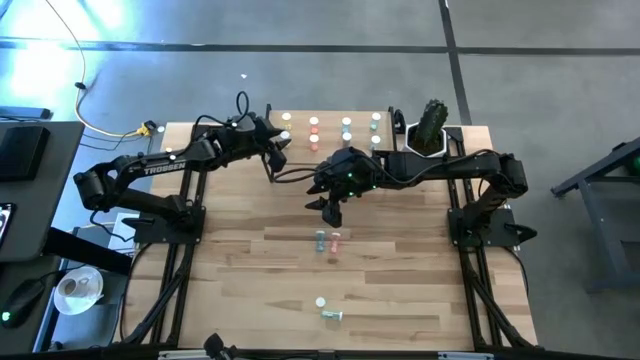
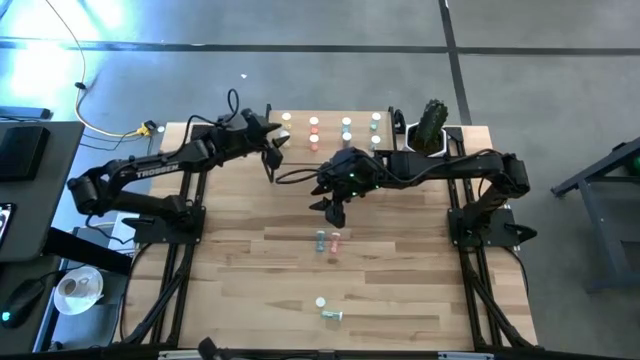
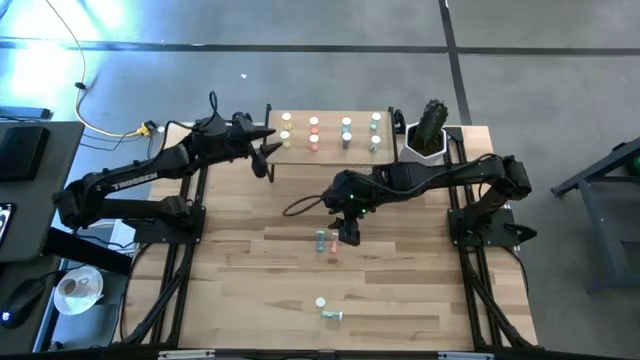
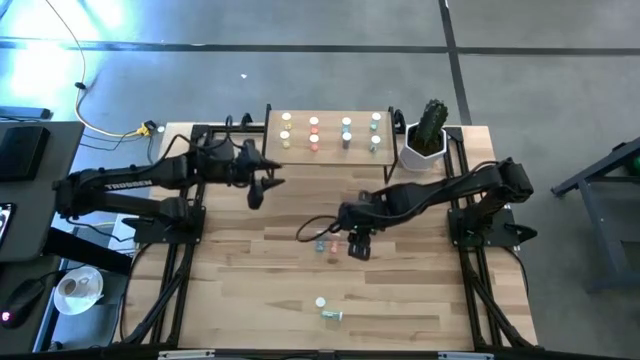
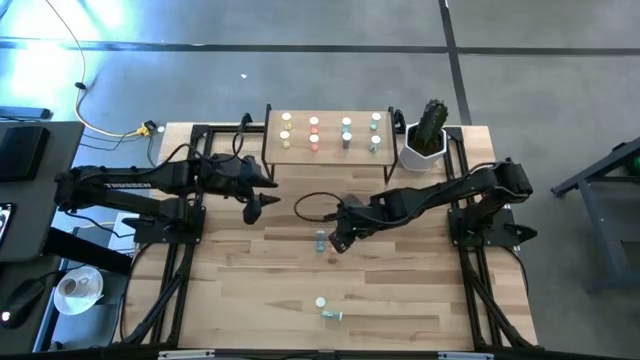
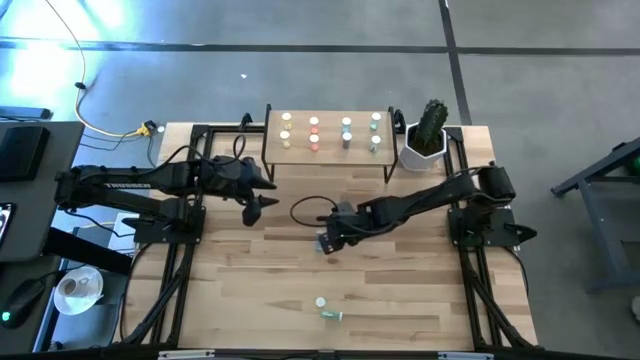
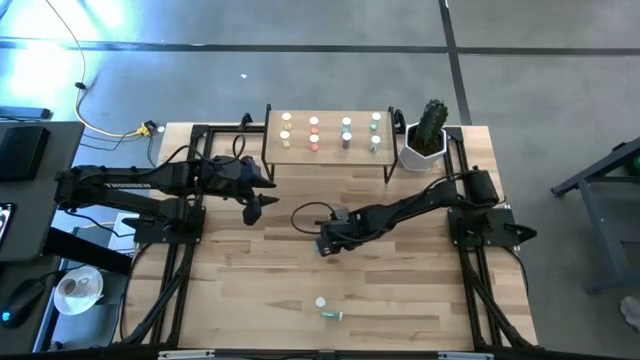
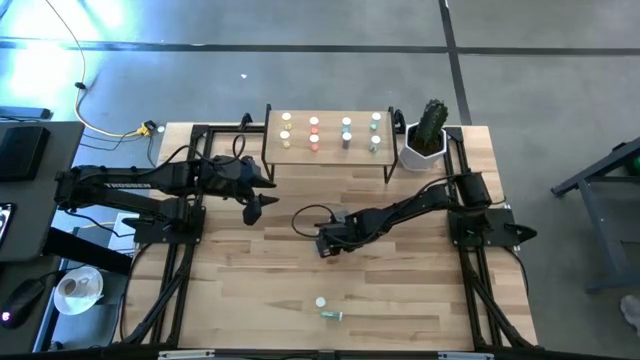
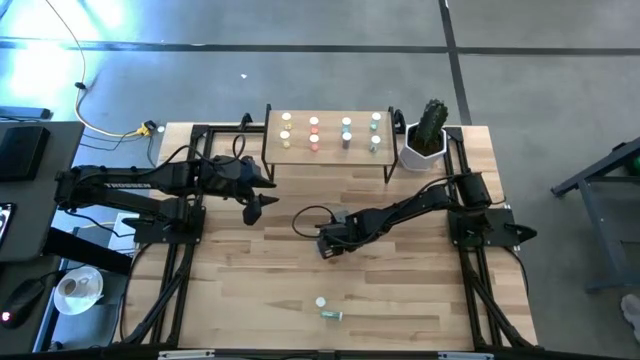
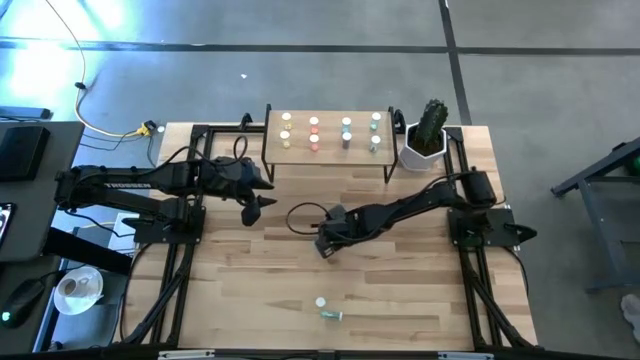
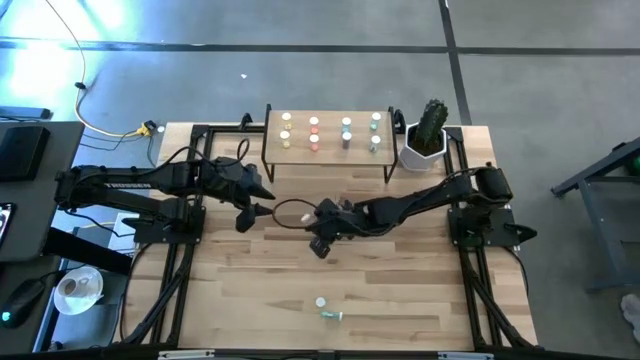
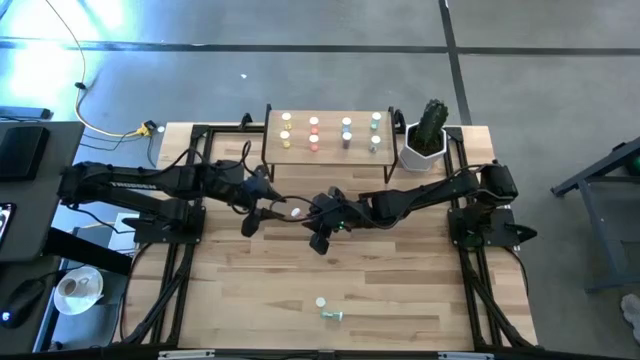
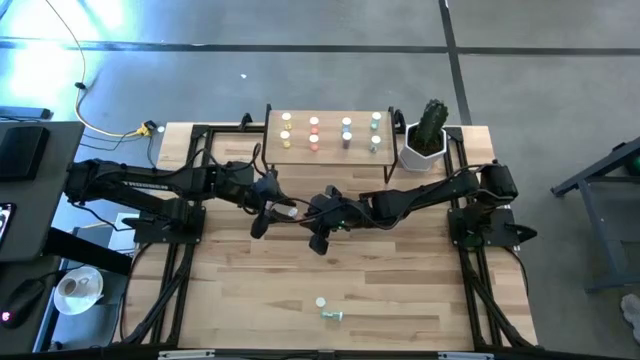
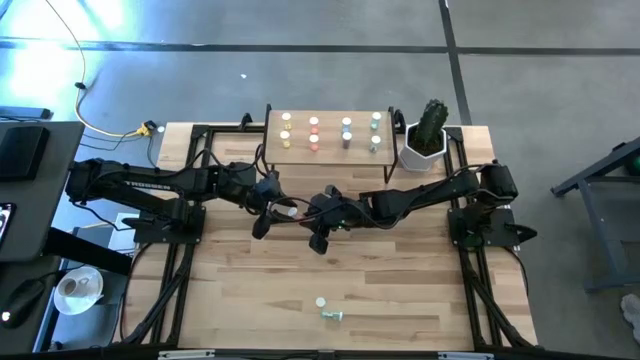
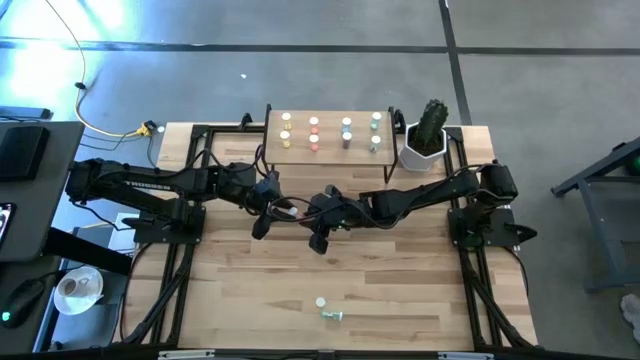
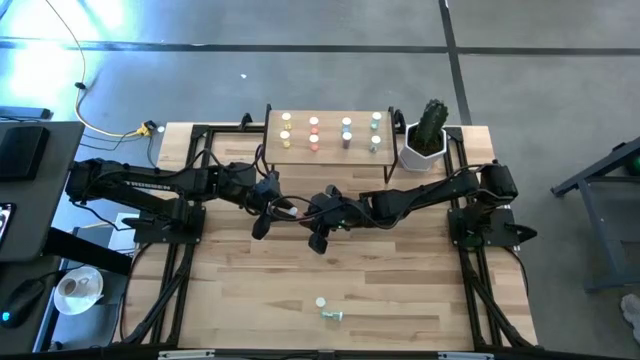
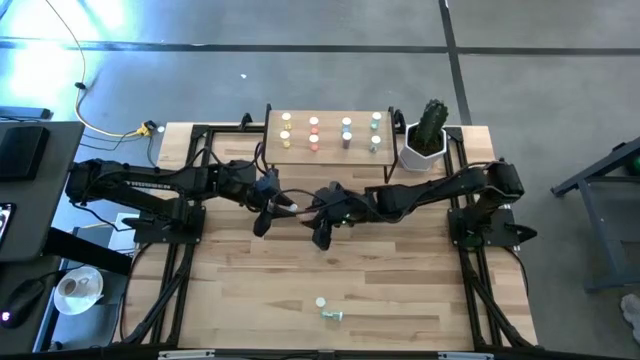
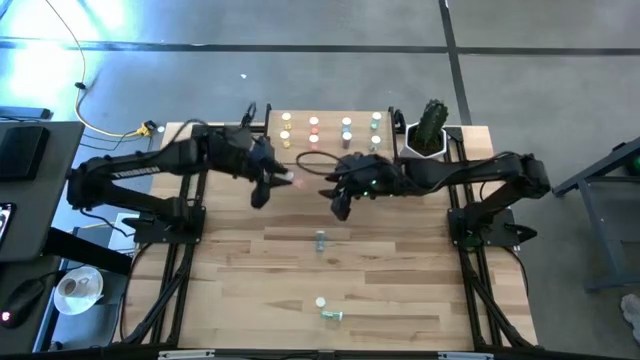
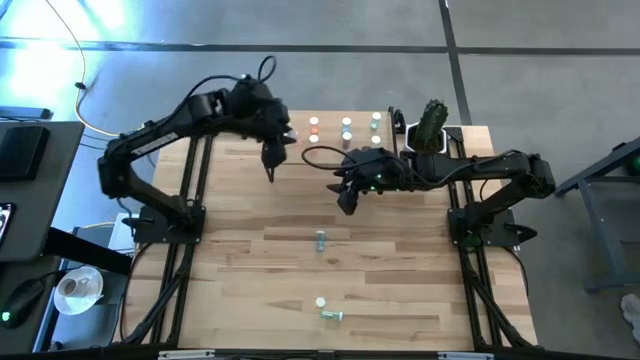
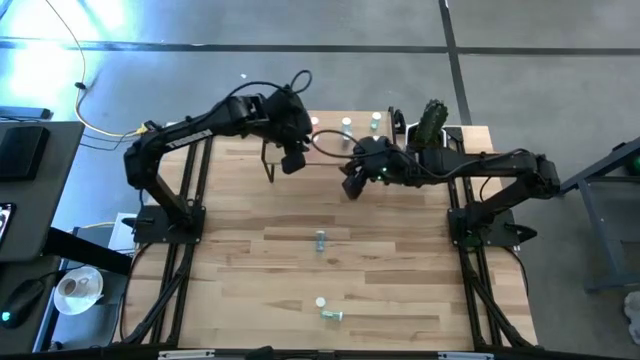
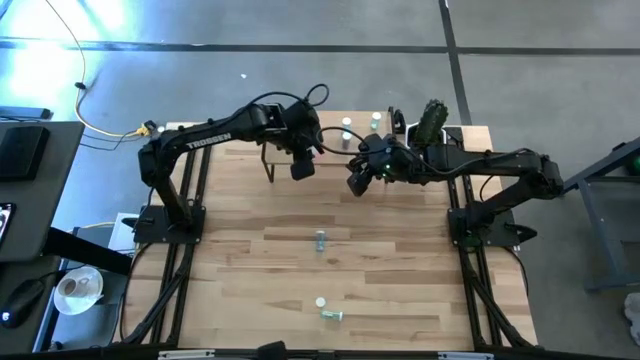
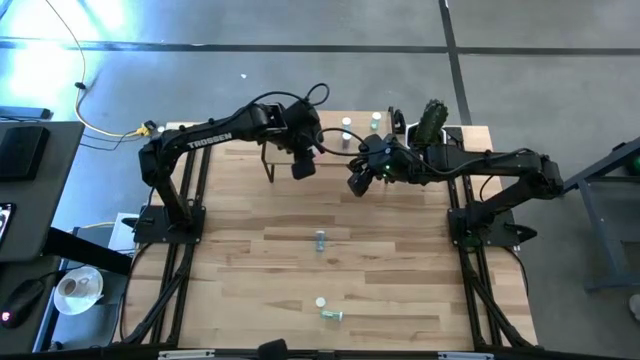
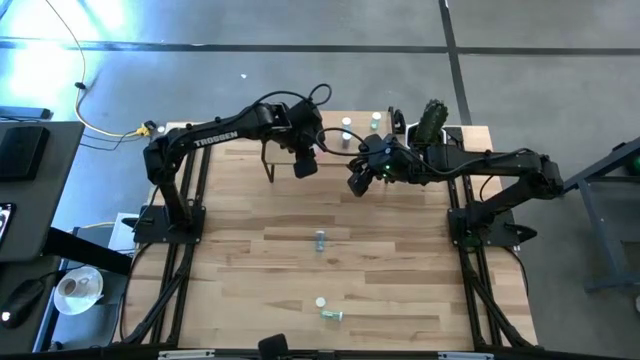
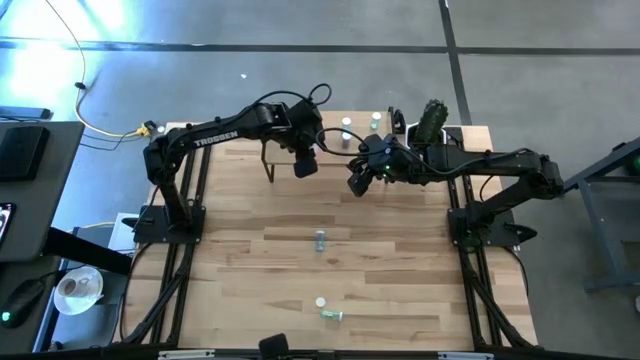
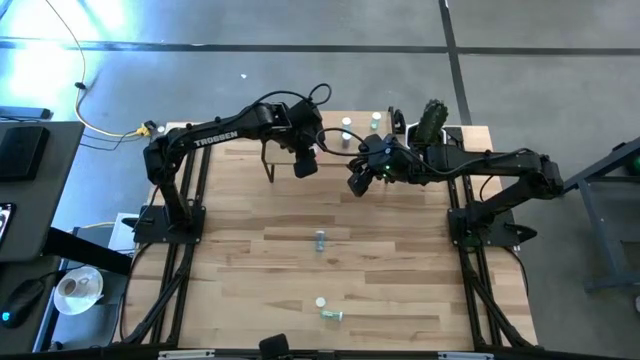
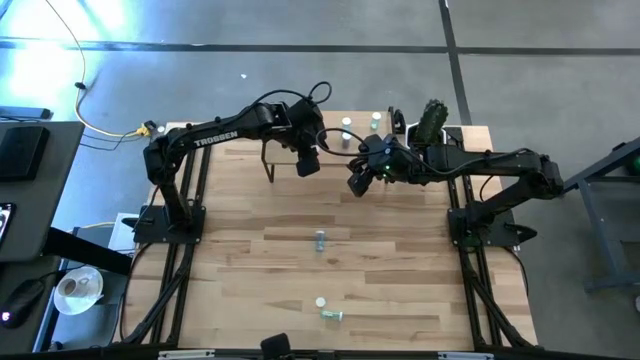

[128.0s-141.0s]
Task: Pick and place medicine bottles onto shelf by color
Put the pink pill bottle on the shelf aligned with the other pink pill bottles

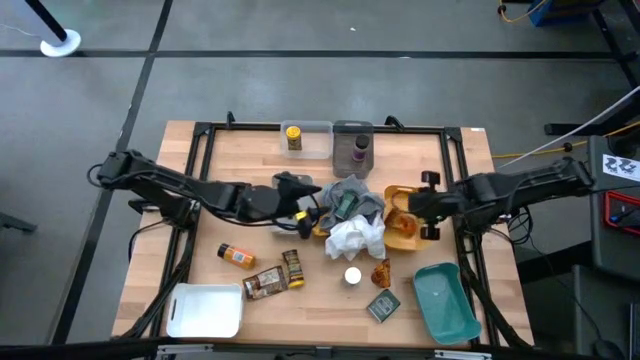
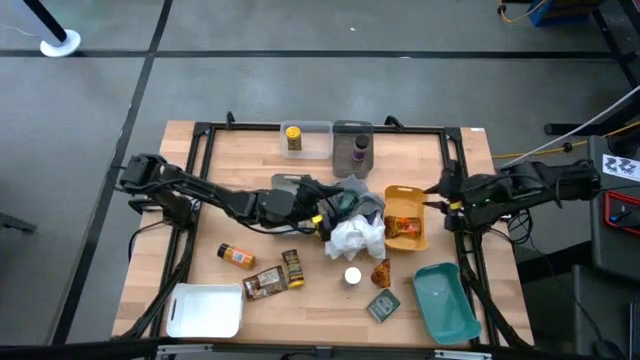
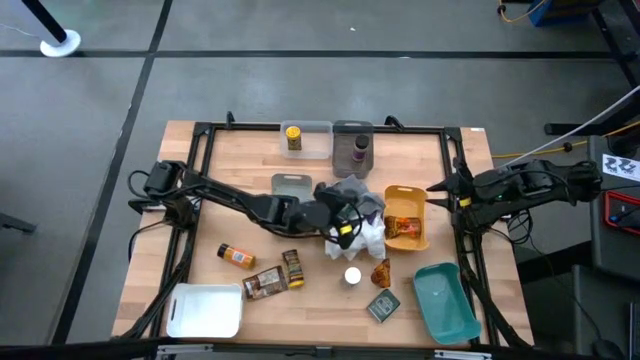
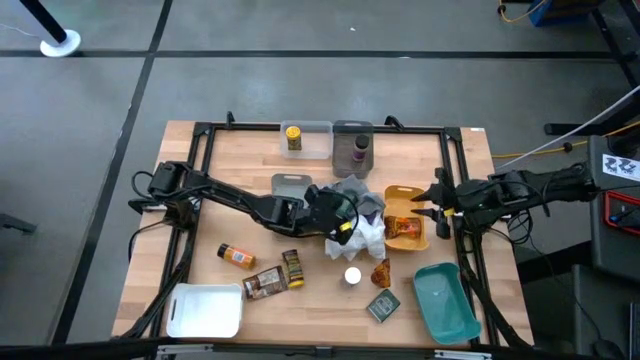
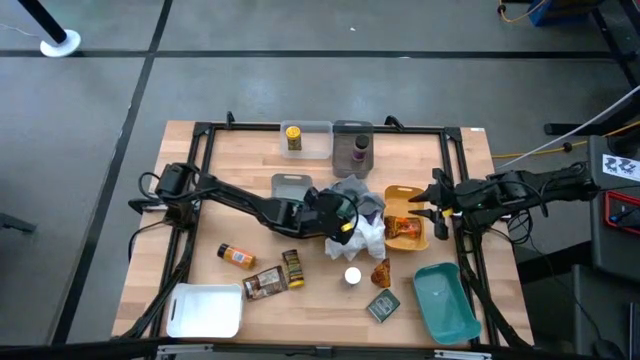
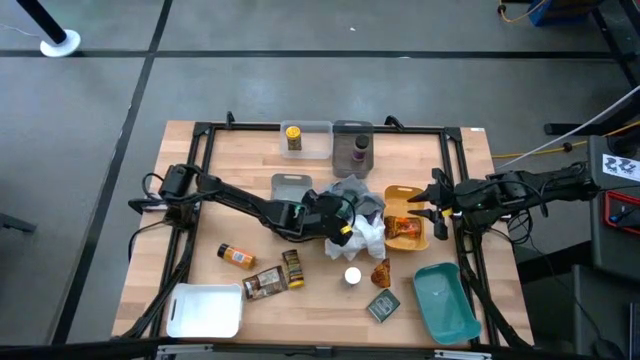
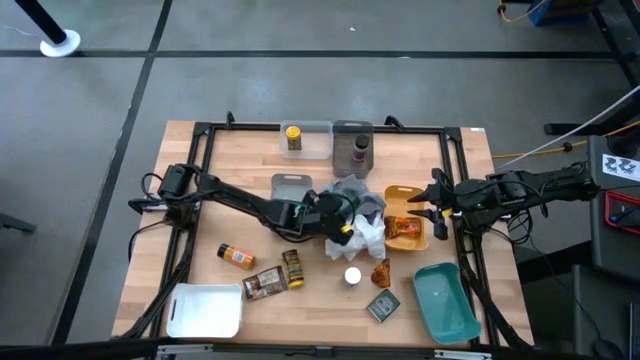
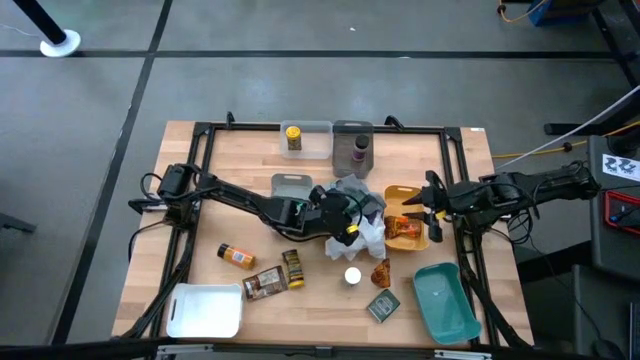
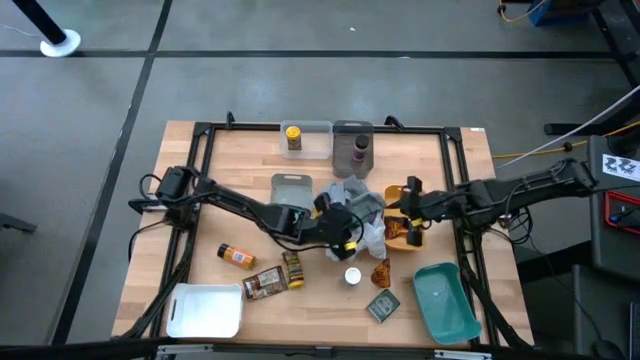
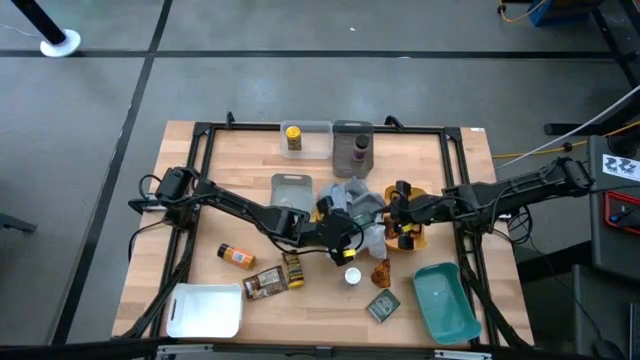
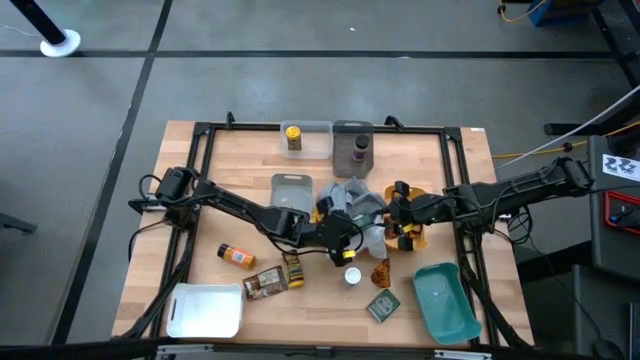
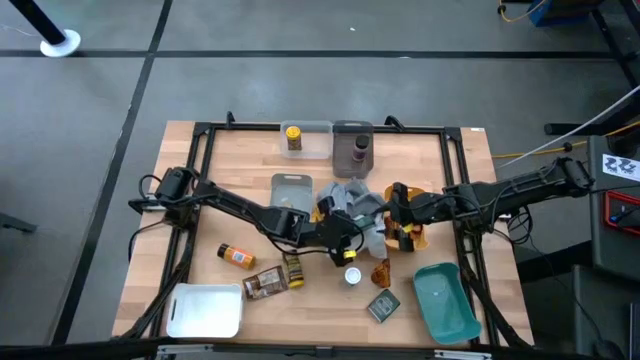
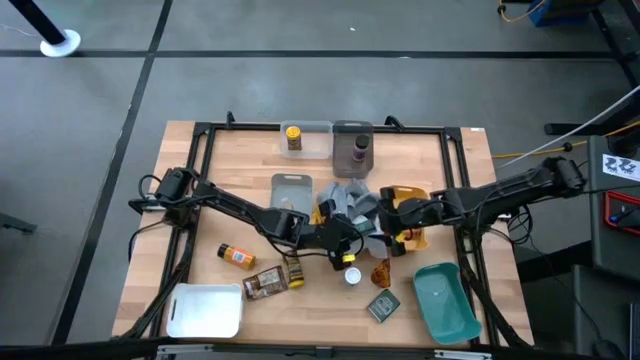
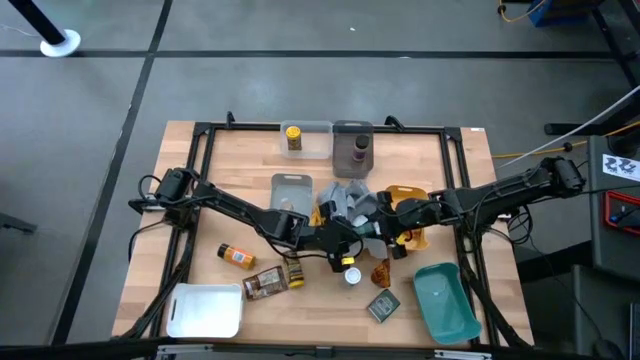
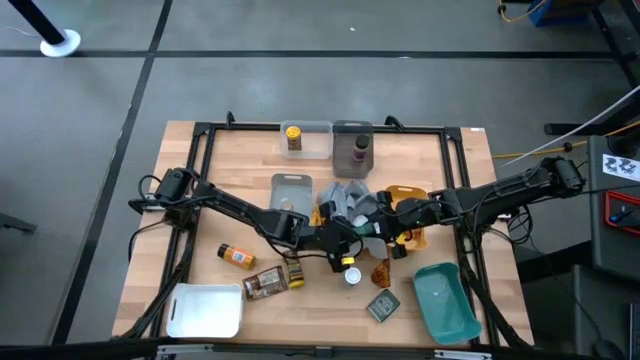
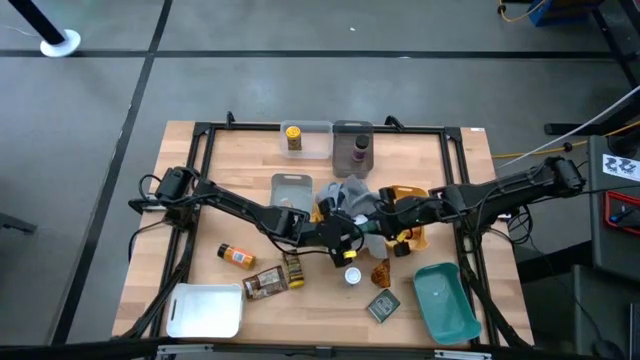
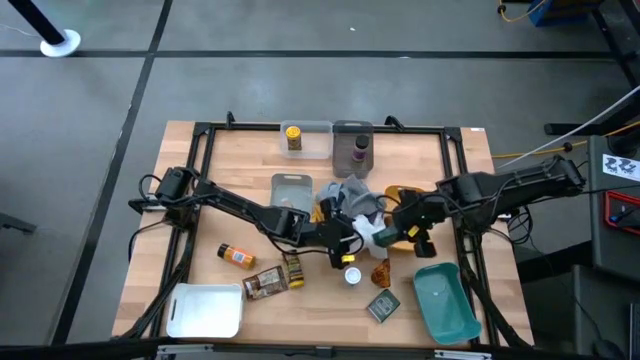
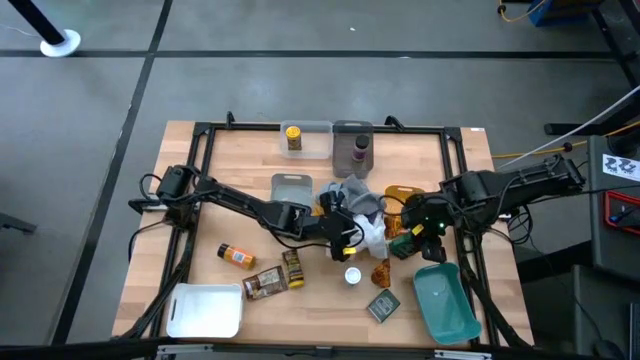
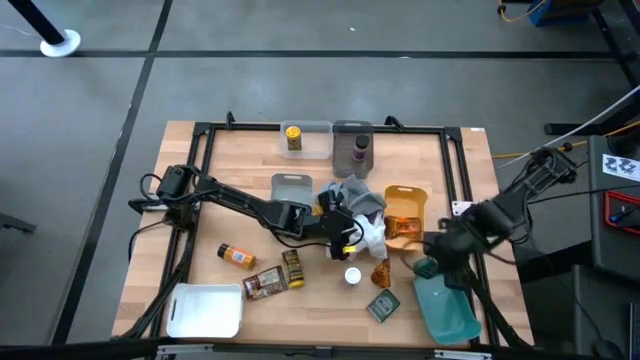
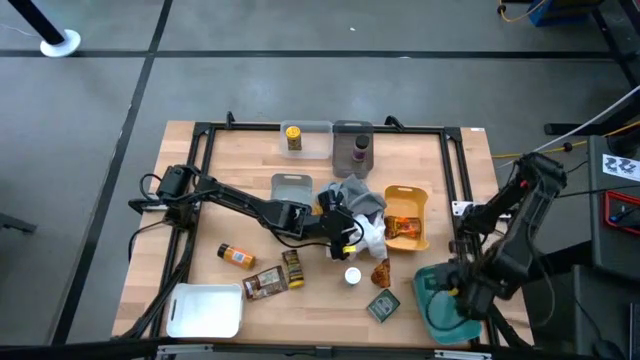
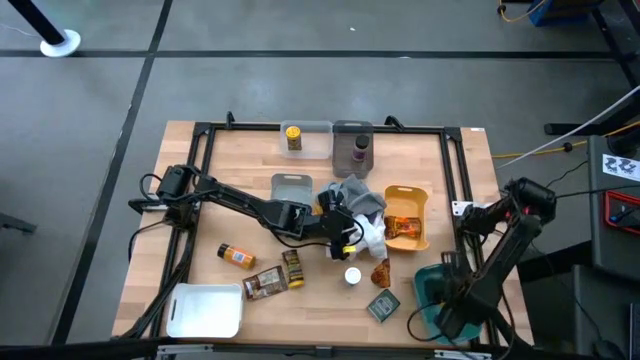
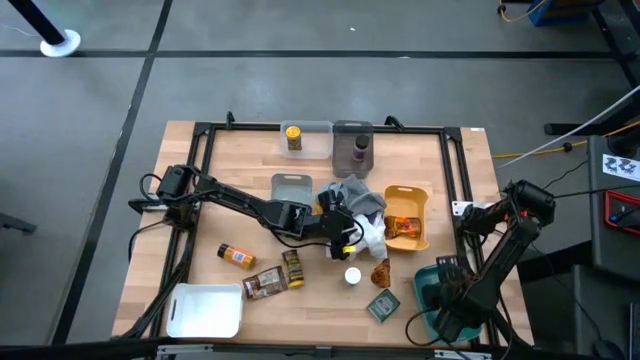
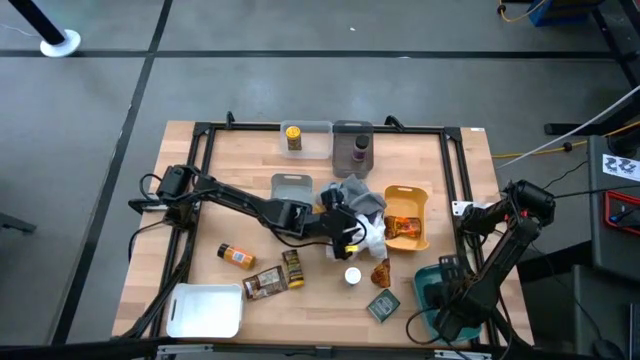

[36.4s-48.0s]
Task: Sort spices by type
Put the top green seasoning can into the green bin
